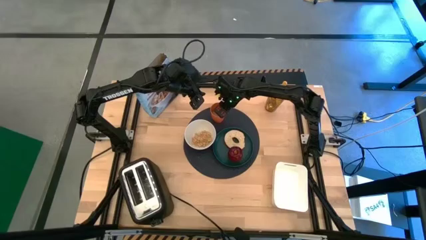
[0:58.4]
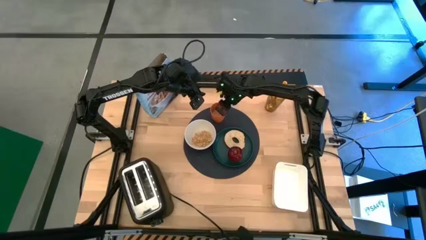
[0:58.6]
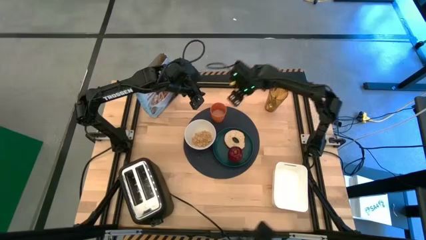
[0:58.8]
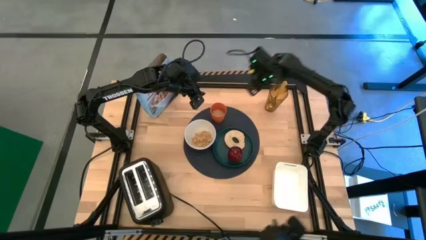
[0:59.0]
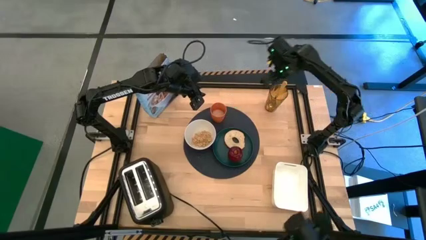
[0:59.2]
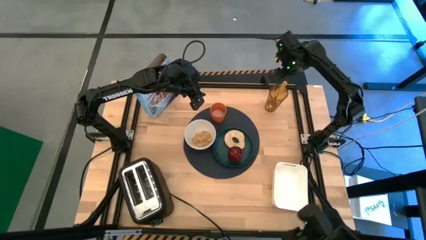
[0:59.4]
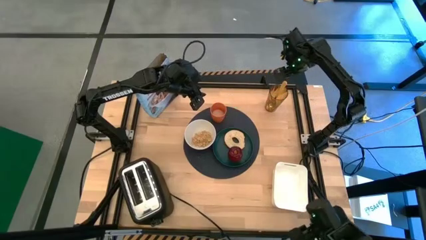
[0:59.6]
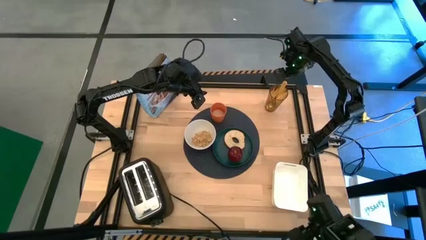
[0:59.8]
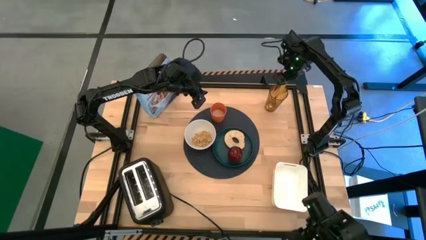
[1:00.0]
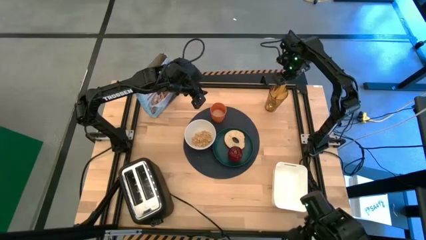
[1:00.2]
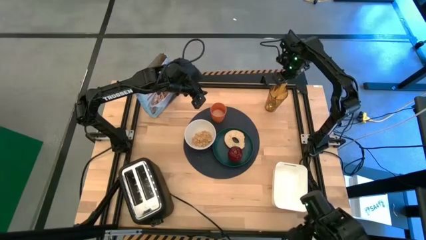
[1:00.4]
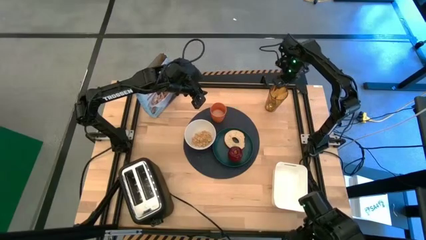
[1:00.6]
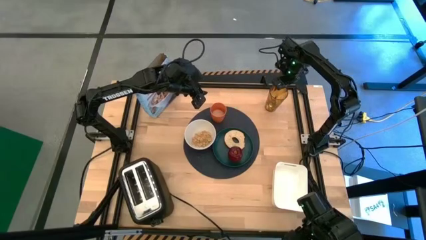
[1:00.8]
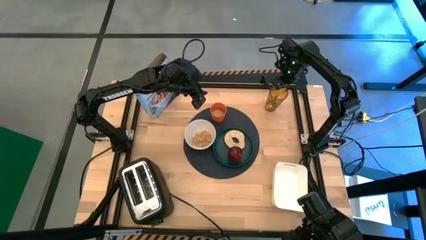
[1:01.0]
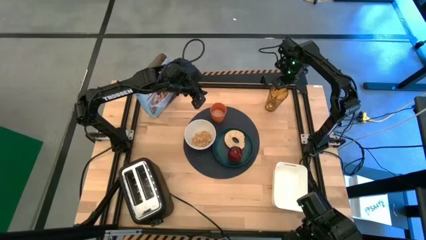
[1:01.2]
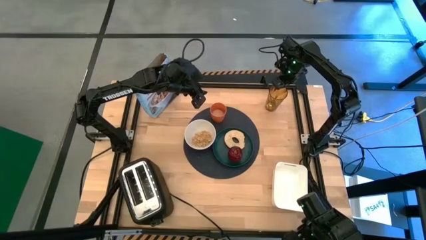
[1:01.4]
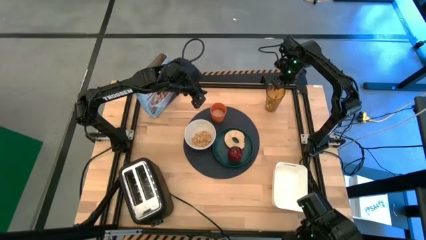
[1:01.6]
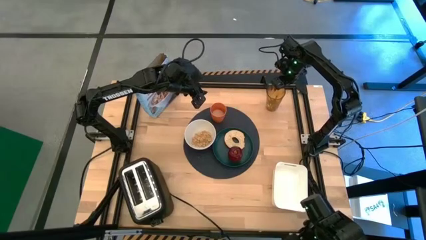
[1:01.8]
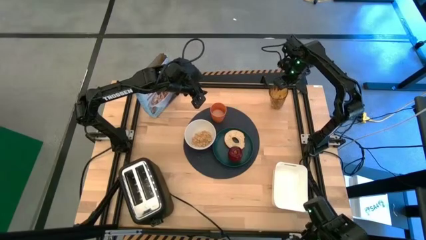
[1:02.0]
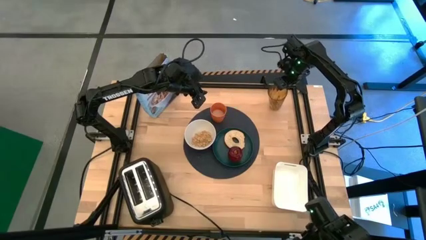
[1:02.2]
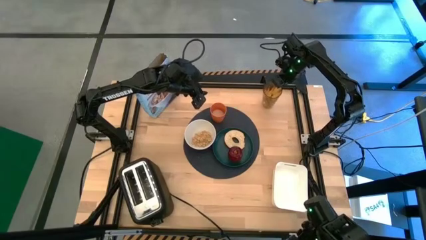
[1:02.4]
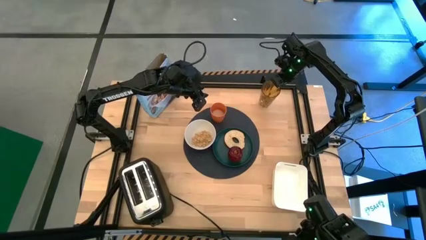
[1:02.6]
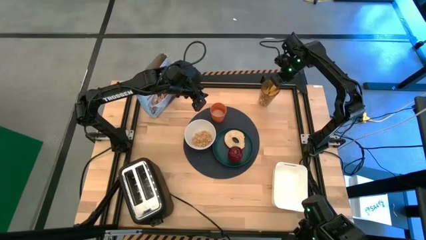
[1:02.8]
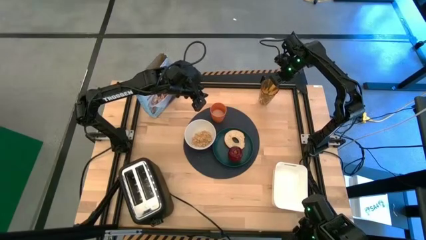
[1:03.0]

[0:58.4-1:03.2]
Task: Arrange a breakfast setting
Put the yellow spoon to the right of the green plate on the blue table mat

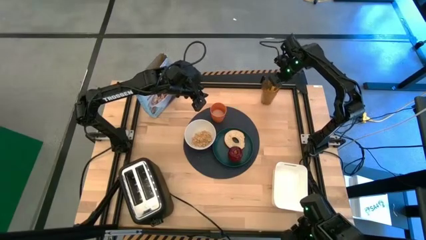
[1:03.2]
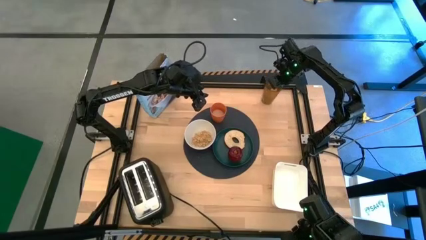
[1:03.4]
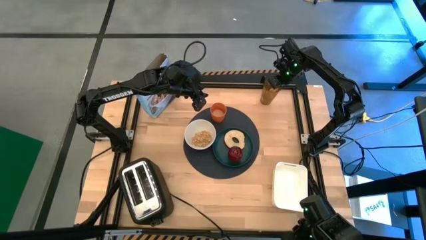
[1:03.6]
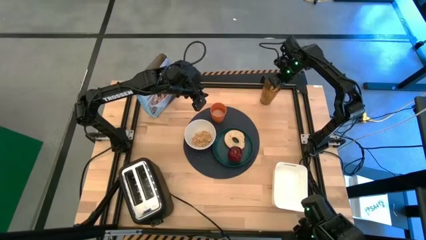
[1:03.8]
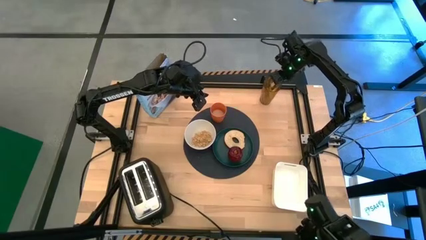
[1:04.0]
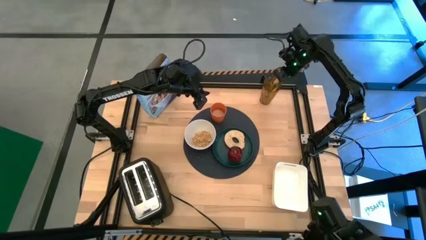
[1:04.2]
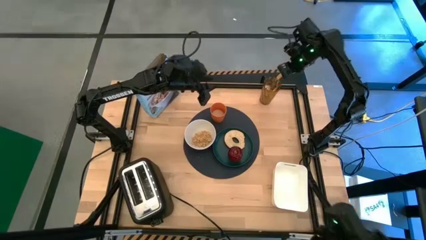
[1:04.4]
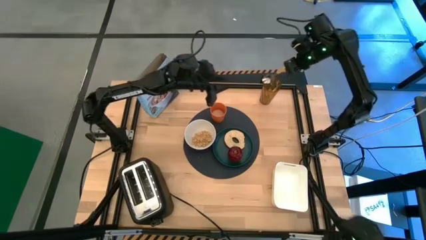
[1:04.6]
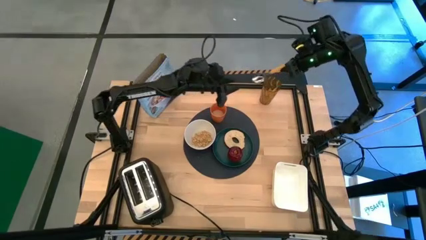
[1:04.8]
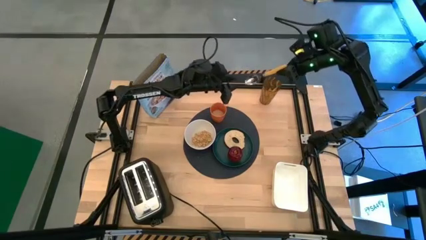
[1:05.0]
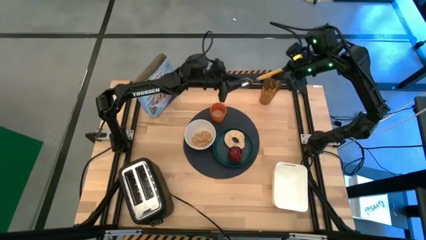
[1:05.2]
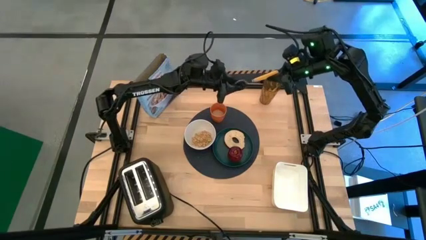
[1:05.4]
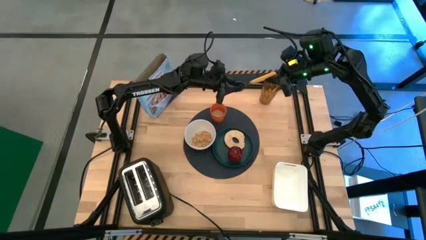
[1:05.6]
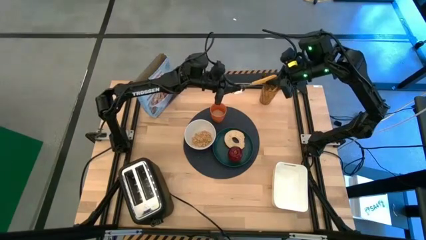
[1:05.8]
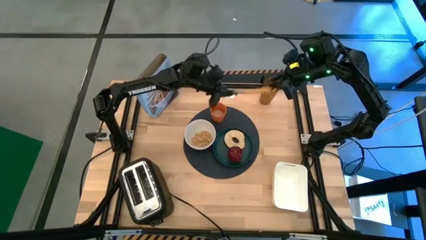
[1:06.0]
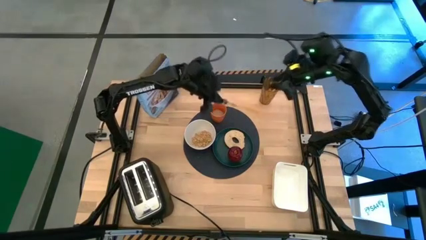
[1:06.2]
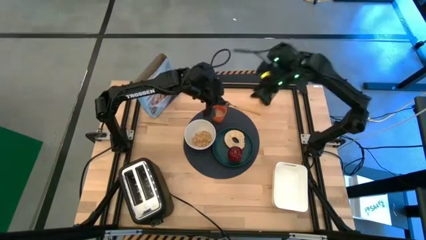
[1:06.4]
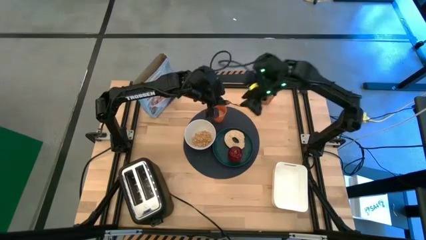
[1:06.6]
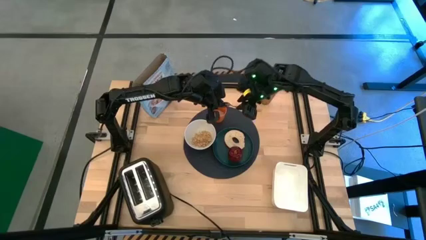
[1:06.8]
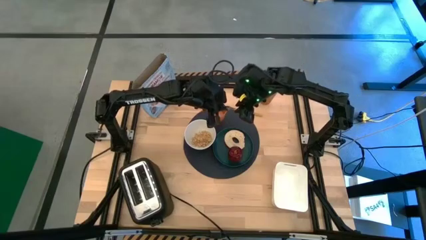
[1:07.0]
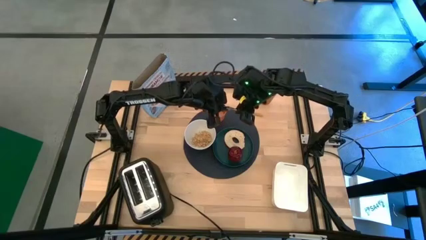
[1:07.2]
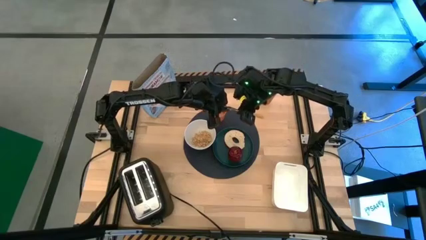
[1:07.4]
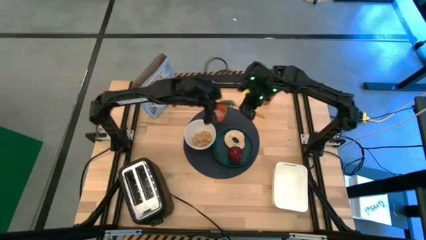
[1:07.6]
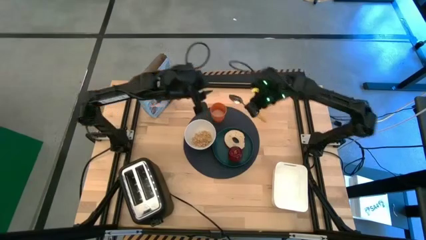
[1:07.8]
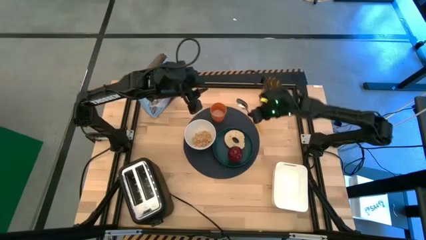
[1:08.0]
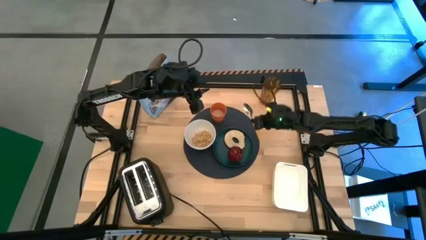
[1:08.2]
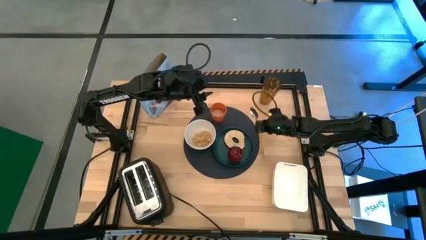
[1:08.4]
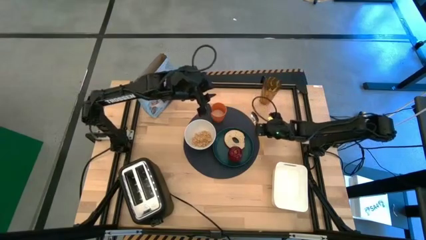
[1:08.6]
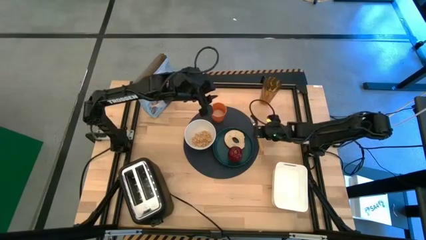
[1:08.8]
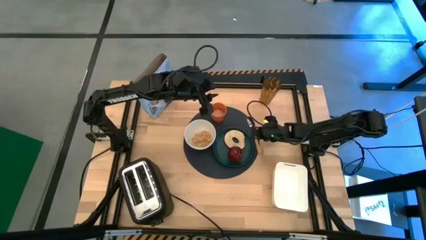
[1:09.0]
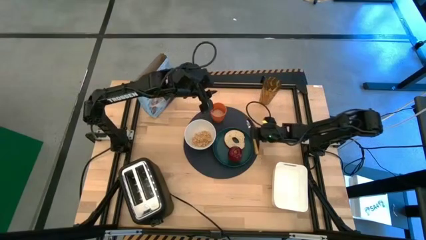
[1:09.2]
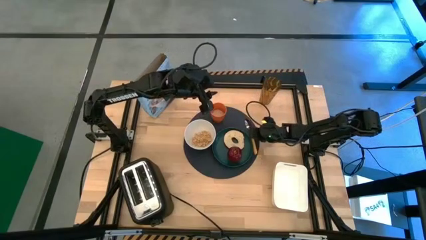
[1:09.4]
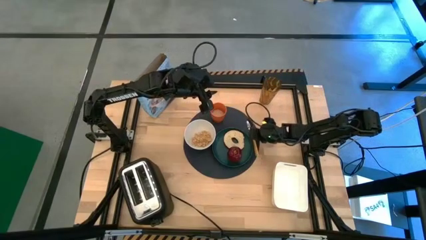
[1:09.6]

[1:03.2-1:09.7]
Put the yellow spoon to the right of the green plate on the blue table mat

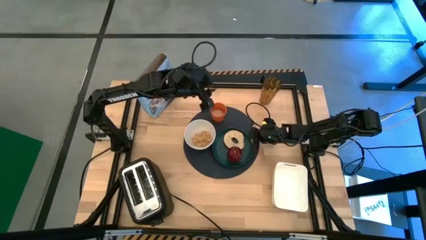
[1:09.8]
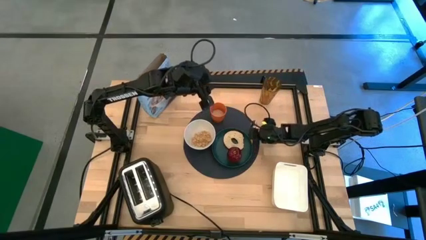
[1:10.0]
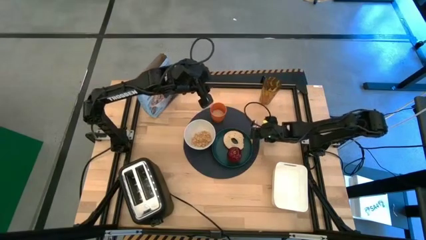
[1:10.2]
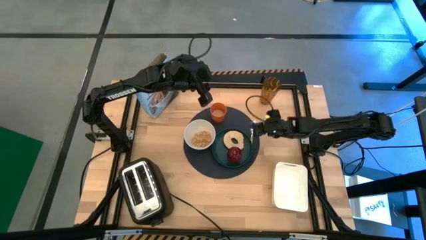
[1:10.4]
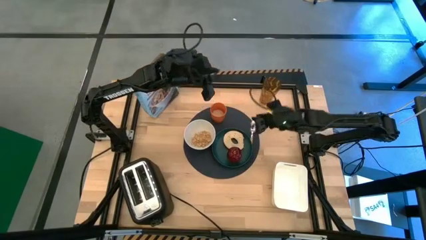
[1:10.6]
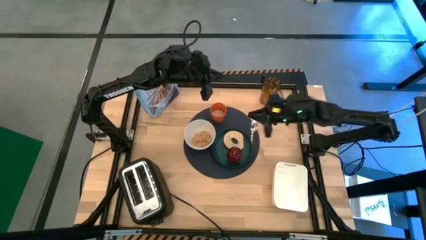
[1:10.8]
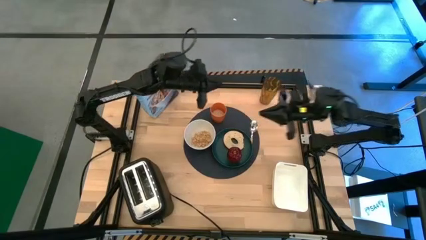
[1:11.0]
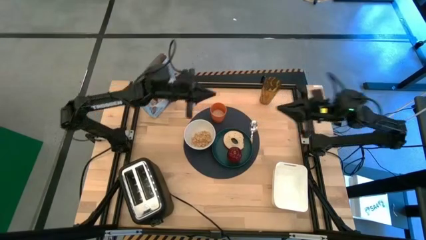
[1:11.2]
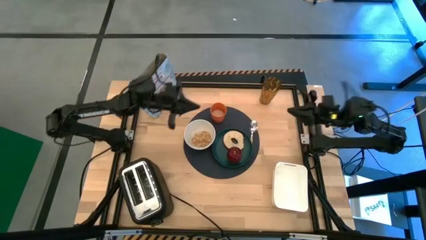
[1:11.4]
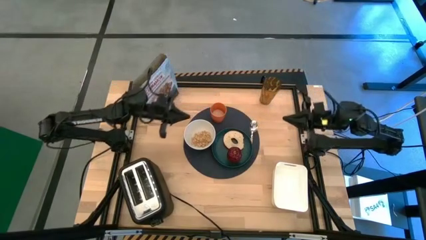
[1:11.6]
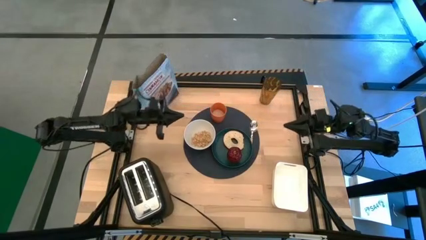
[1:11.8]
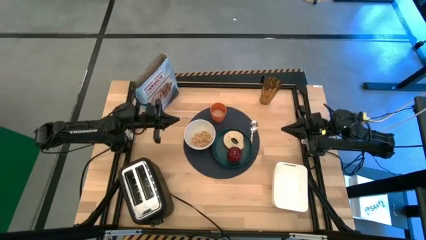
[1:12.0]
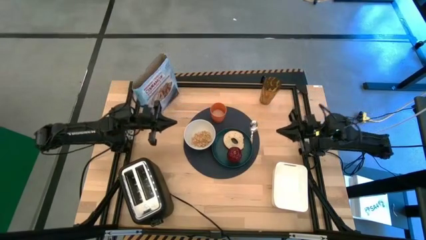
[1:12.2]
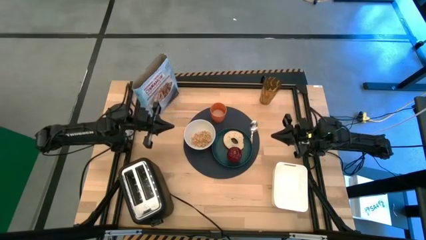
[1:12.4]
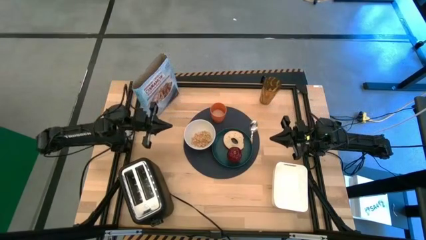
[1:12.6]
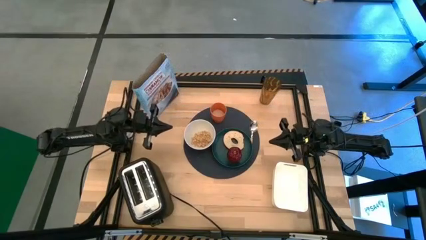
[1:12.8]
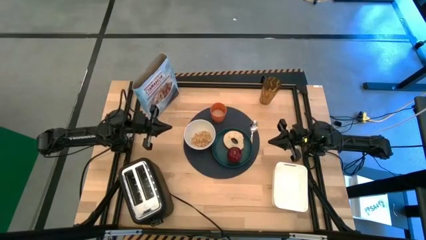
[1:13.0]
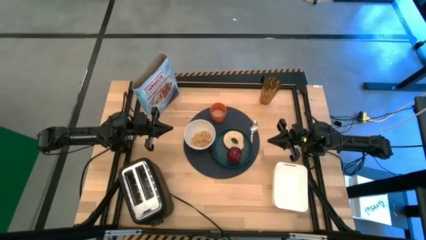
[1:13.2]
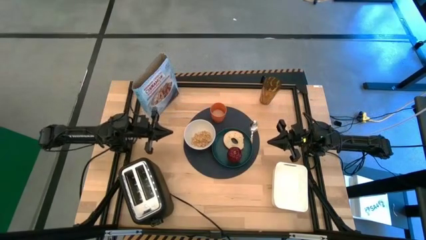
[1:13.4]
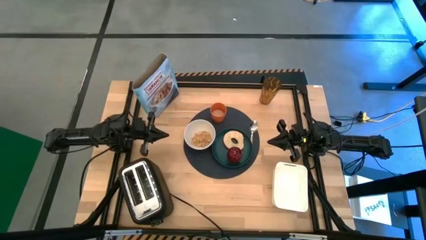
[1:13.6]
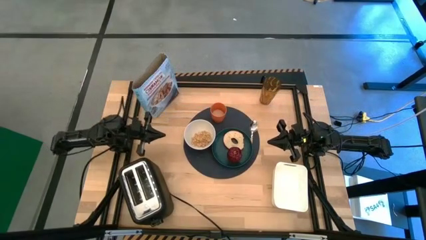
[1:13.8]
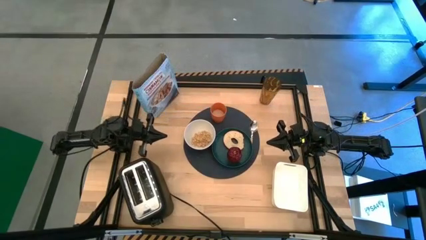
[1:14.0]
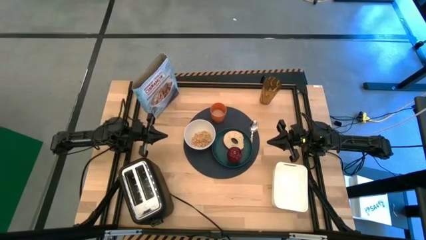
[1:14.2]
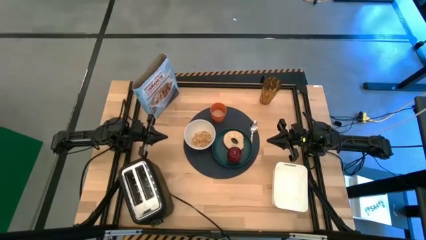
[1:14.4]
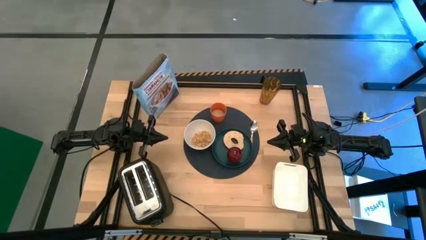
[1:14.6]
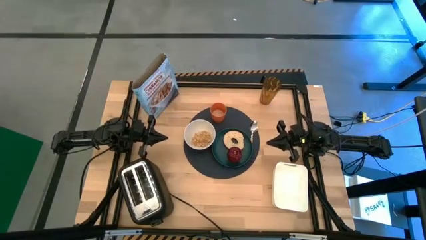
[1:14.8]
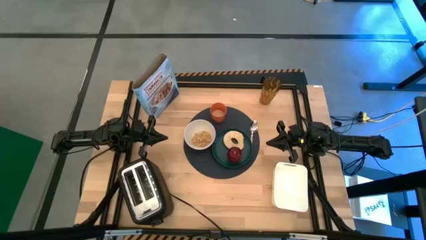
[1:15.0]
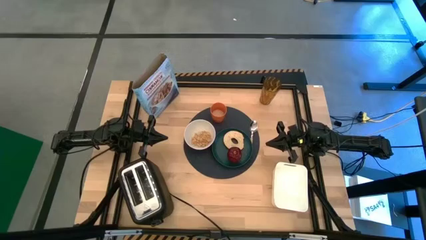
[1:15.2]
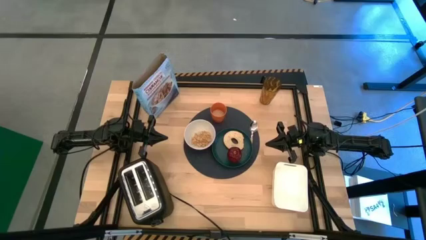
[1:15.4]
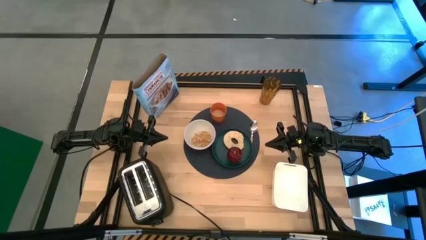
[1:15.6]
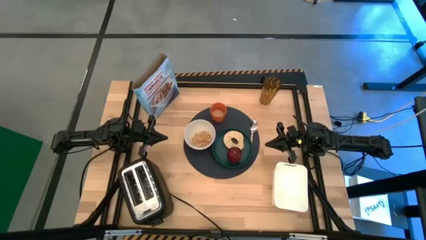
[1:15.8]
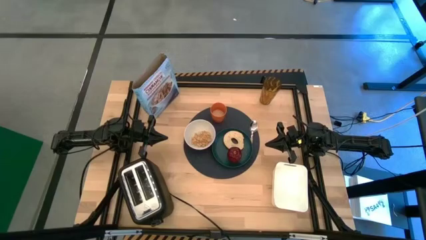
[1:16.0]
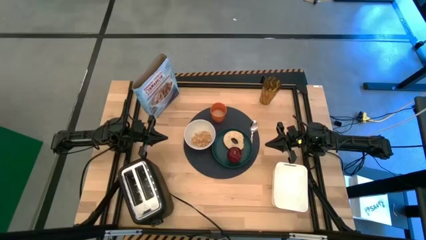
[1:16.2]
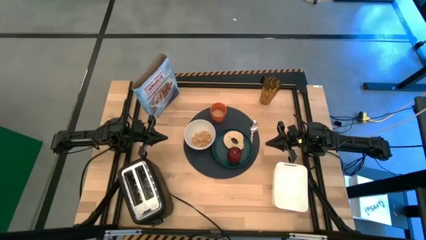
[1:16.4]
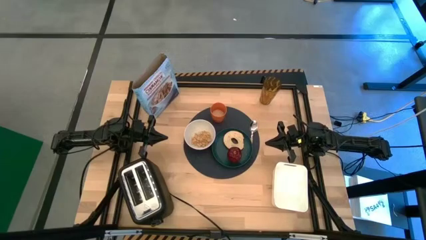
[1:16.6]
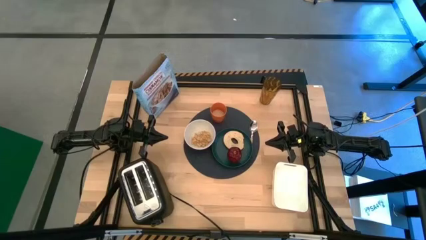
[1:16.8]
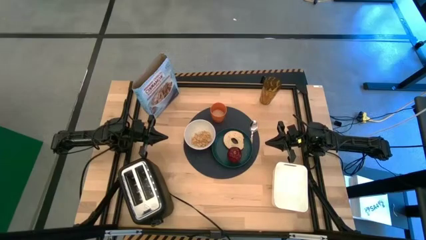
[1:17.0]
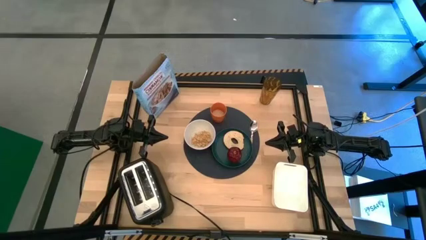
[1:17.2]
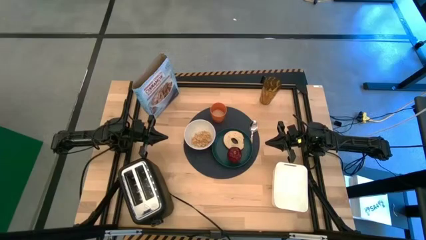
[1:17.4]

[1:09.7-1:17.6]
Return to Home Position
